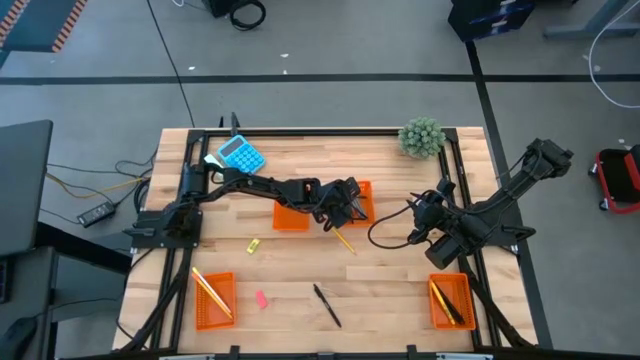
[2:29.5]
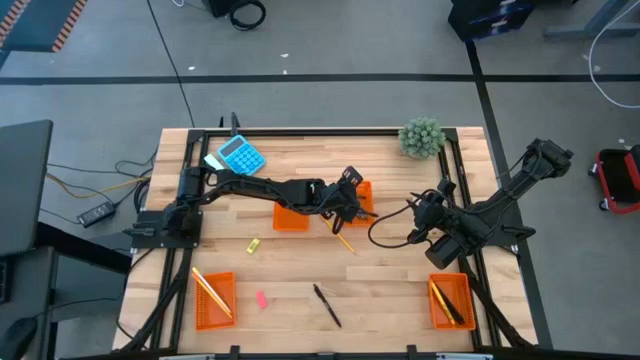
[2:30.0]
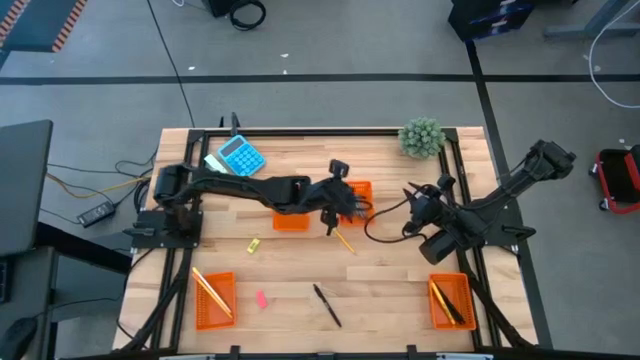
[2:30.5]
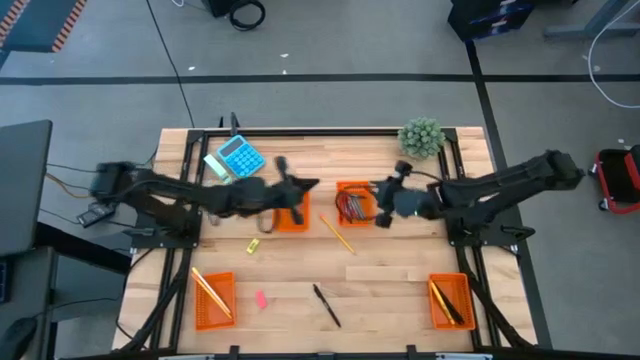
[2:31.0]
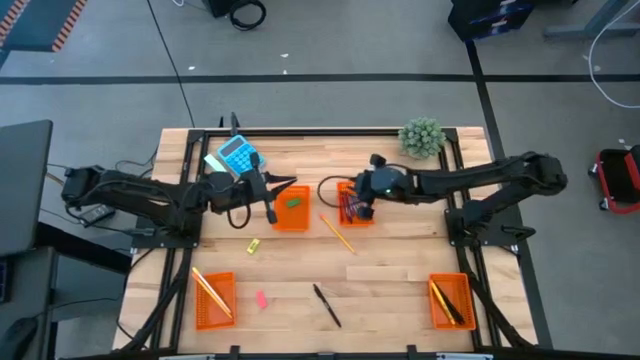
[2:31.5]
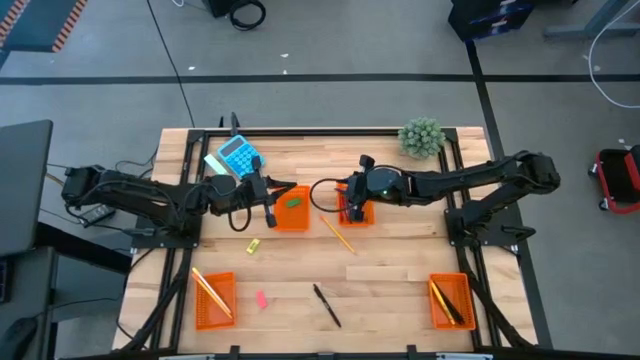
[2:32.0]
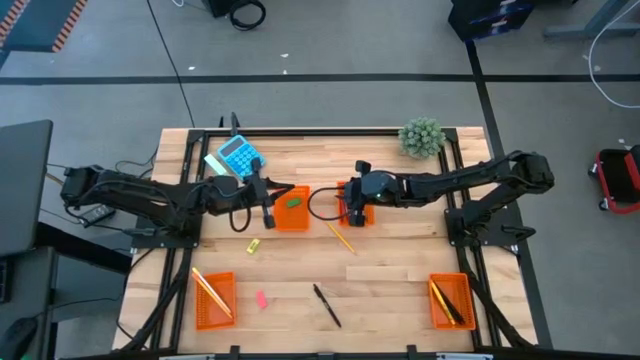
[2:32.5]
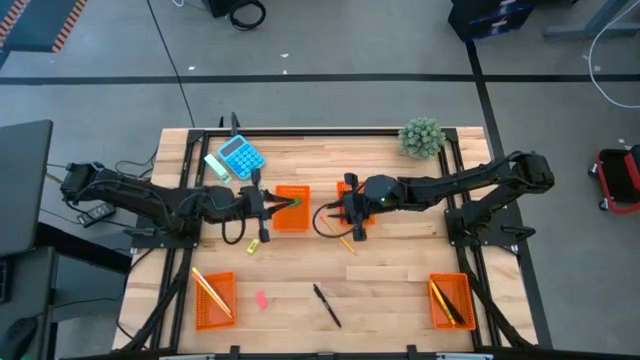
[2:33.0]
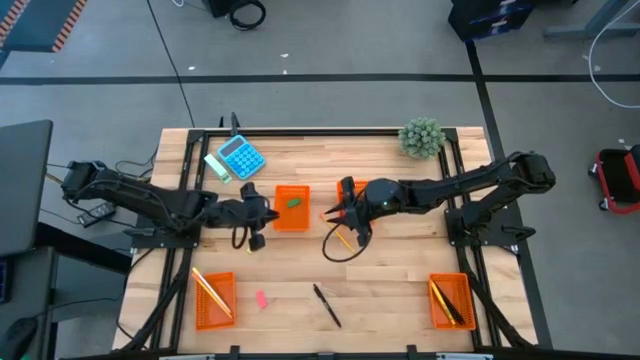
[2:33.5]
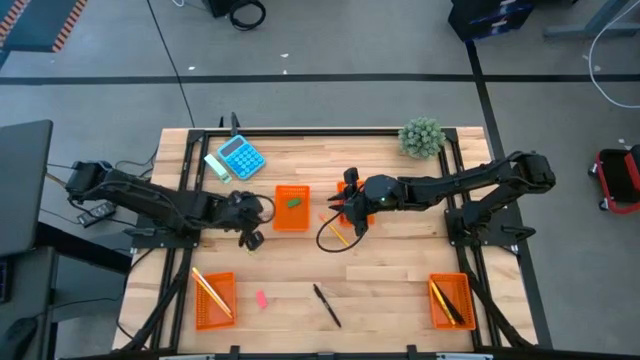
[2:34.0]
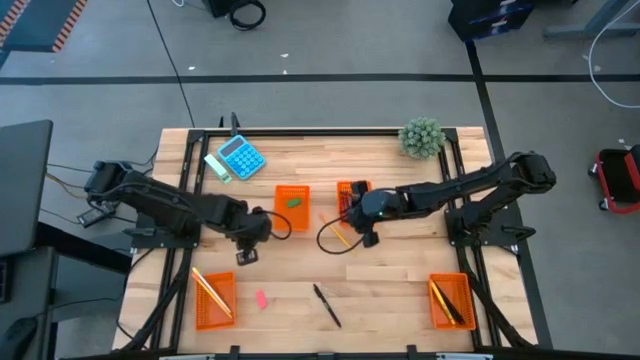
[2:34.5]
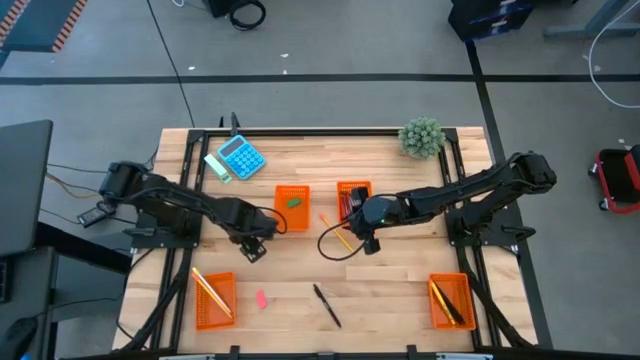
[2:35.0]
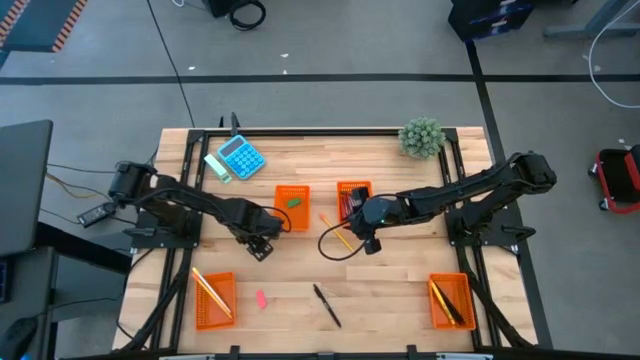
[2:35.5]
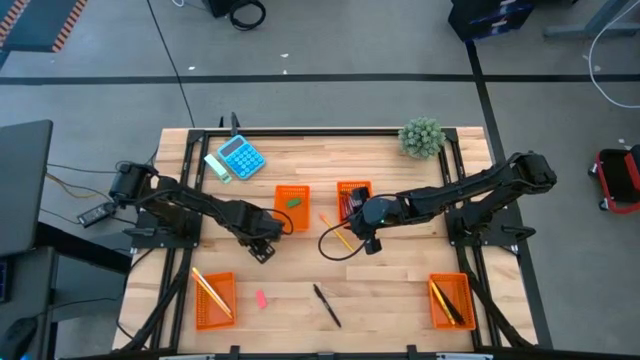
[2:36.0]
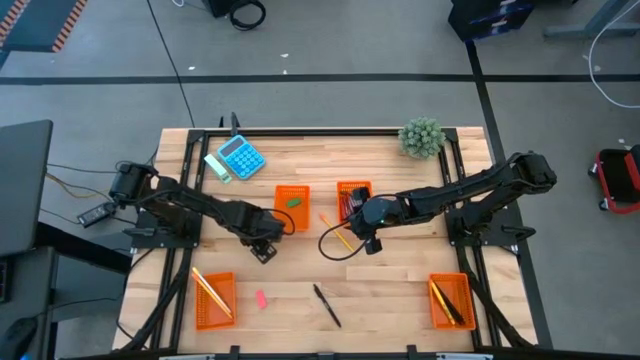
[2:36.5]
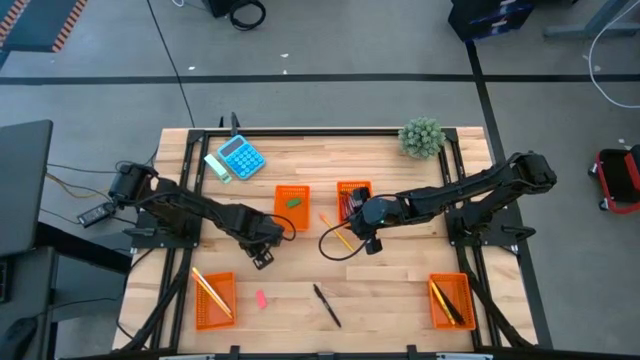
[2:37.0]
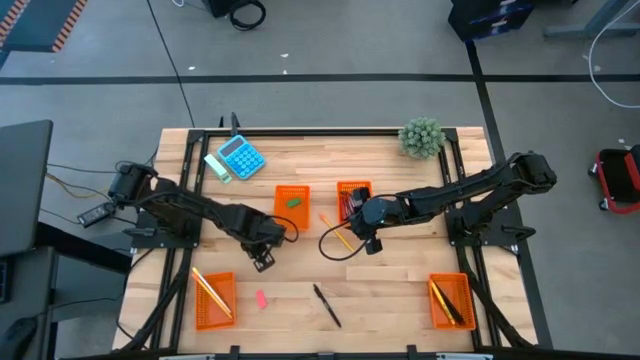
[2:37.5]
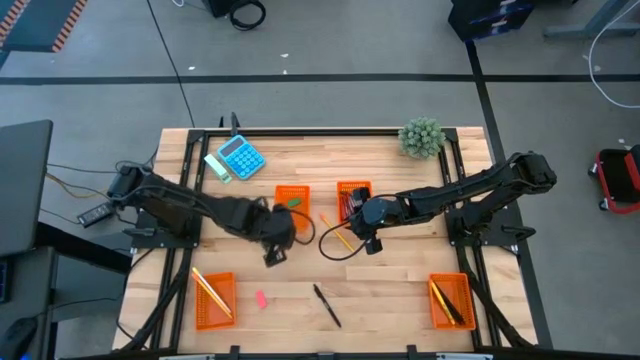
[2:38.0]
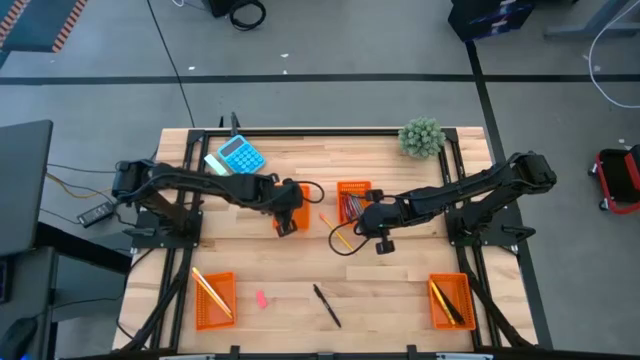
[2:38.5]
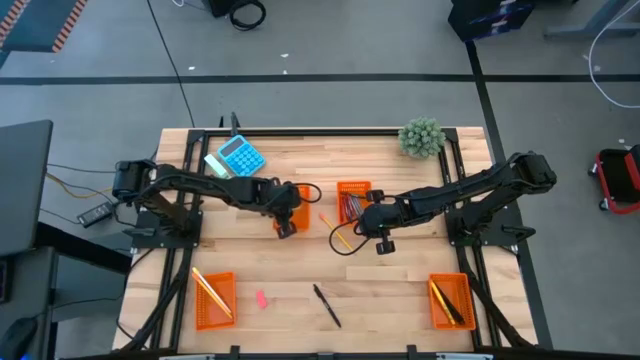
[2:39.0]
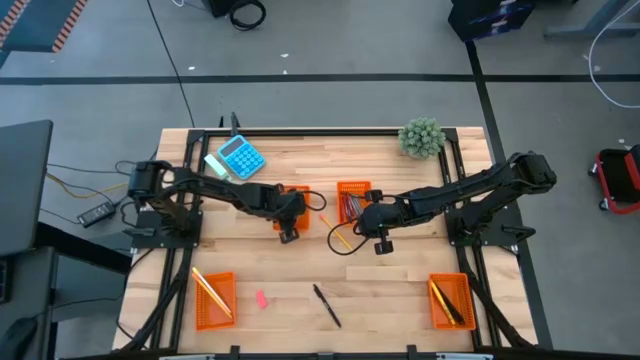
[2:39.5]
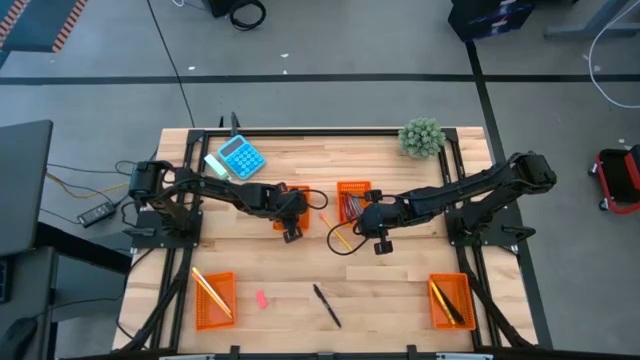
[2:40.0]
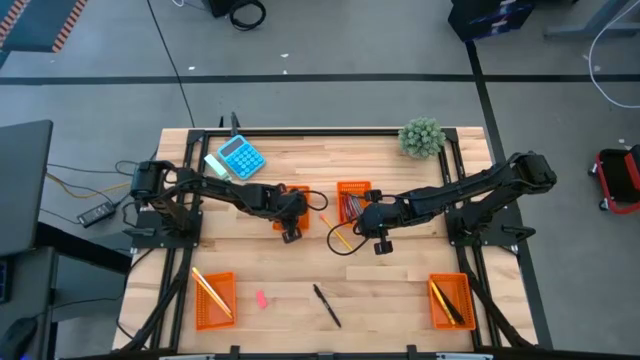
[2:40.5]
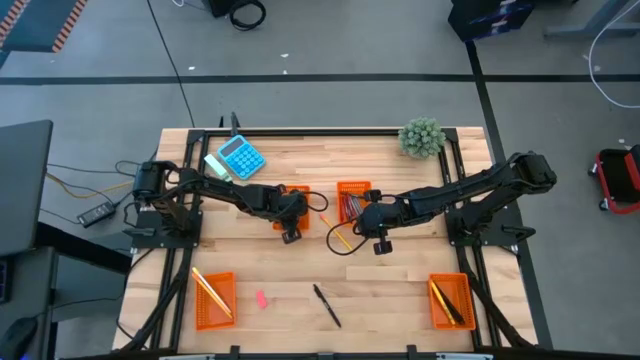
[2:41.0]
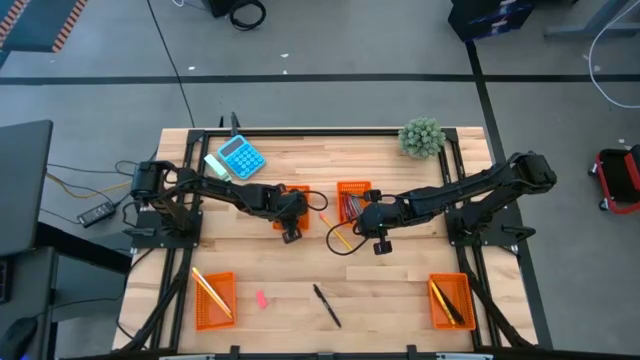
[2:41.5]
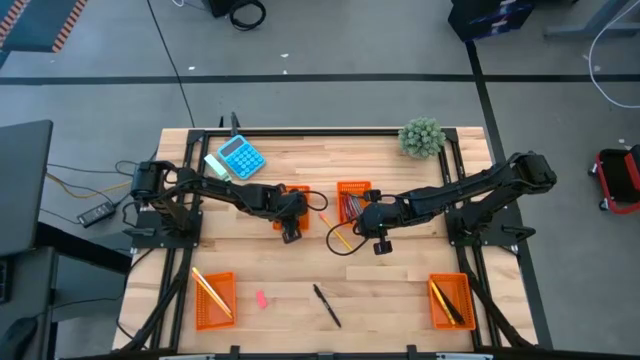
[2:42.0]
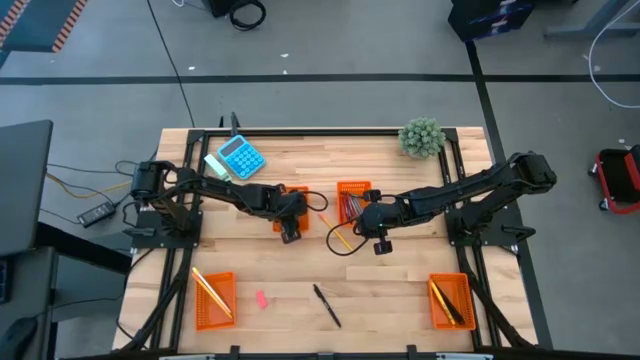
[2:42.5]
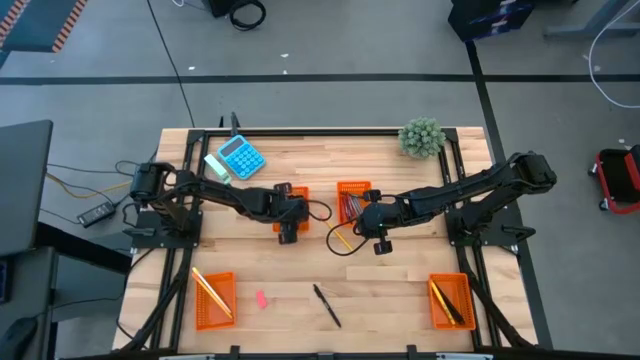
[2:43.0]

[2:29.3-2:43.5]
Task: Sort crayons/erasers/pens/pencils in bins
Put the yellow eraser into the top left orange bin

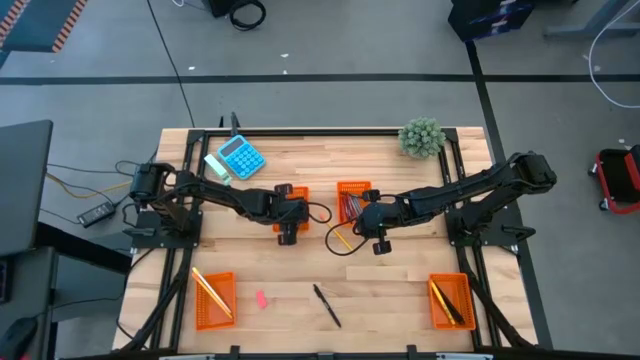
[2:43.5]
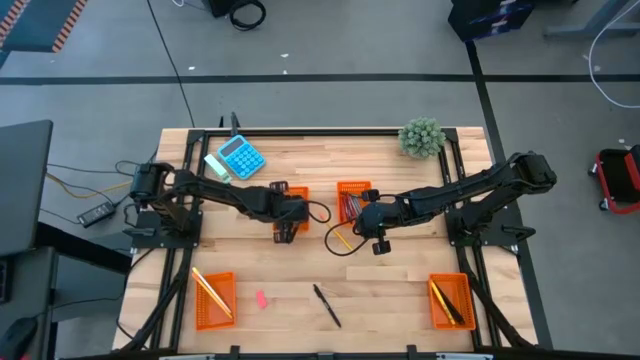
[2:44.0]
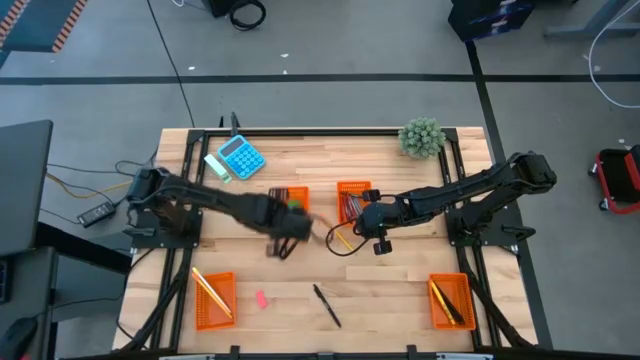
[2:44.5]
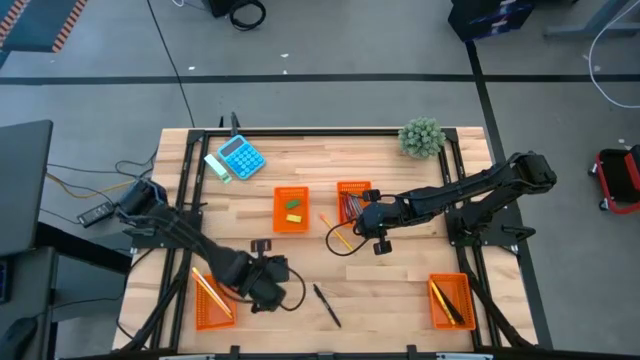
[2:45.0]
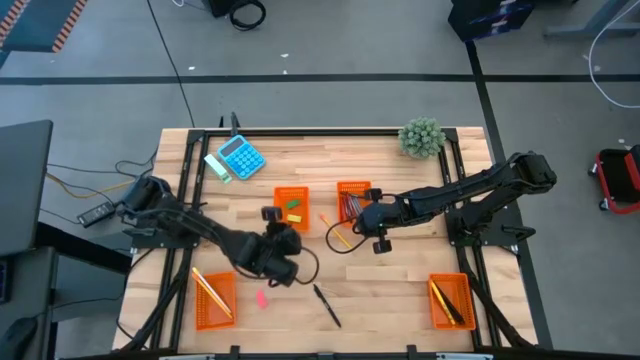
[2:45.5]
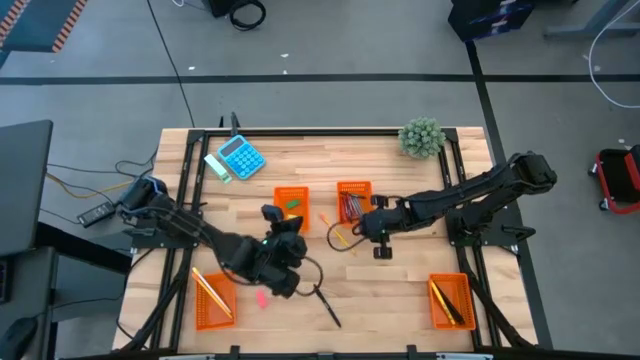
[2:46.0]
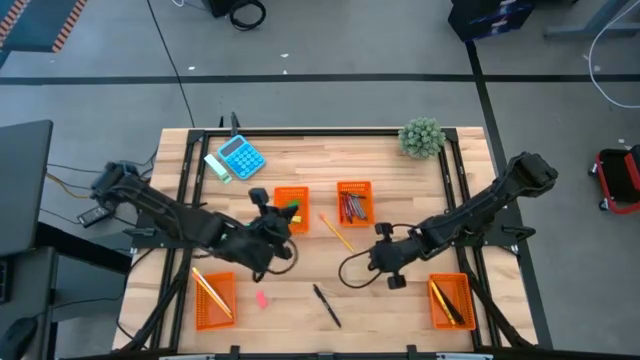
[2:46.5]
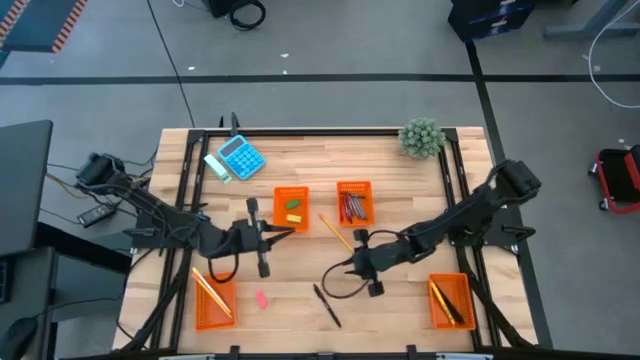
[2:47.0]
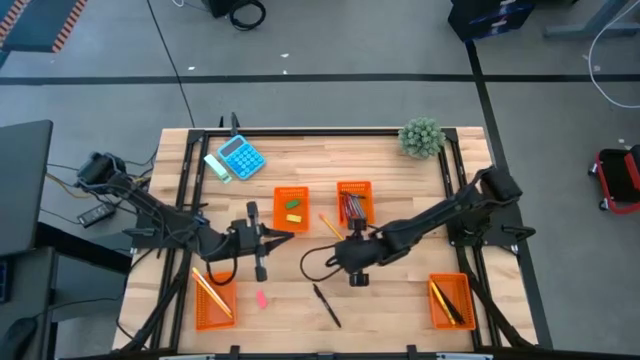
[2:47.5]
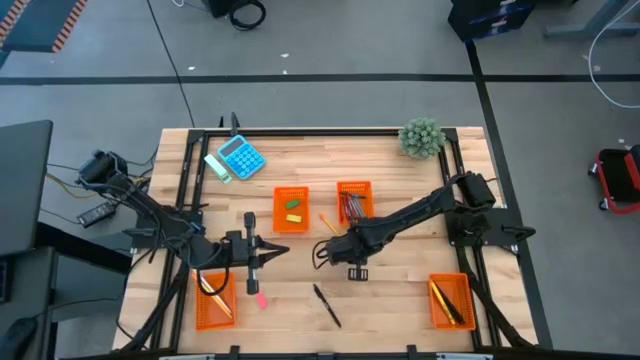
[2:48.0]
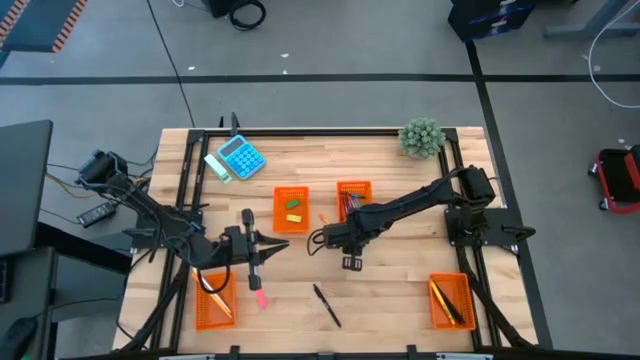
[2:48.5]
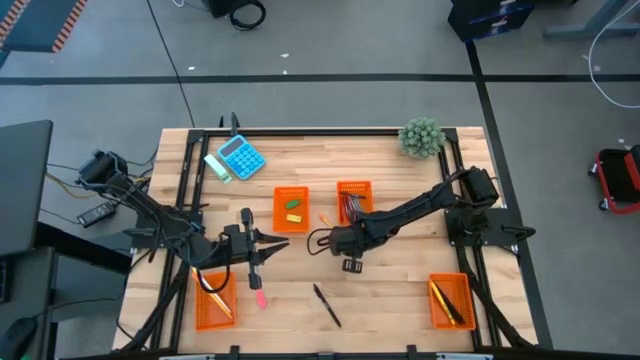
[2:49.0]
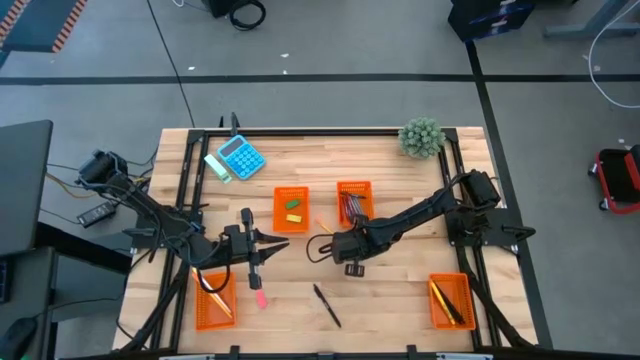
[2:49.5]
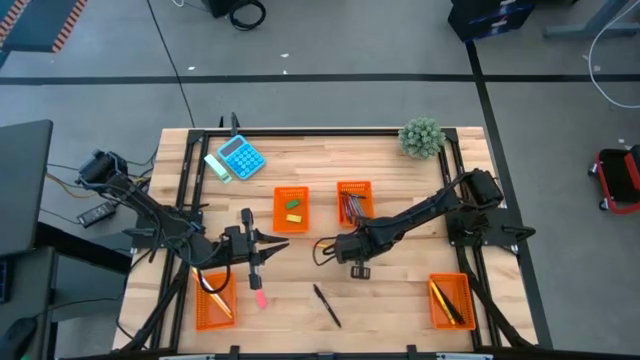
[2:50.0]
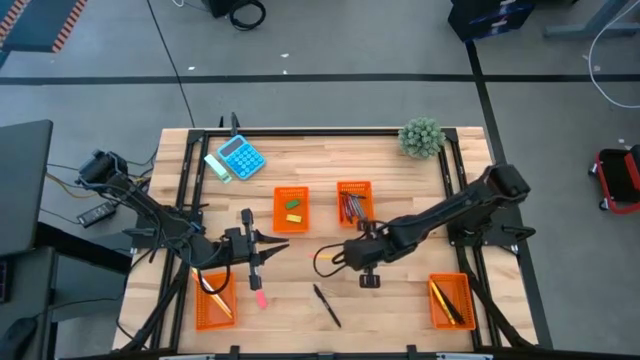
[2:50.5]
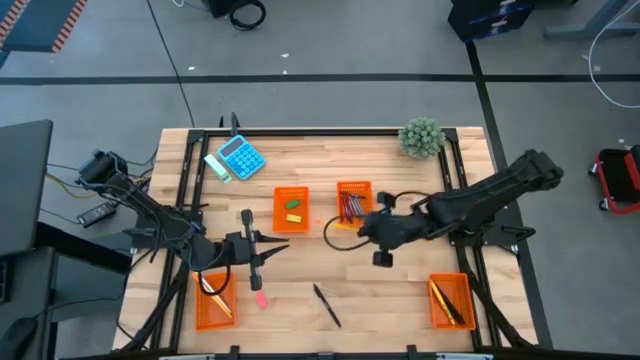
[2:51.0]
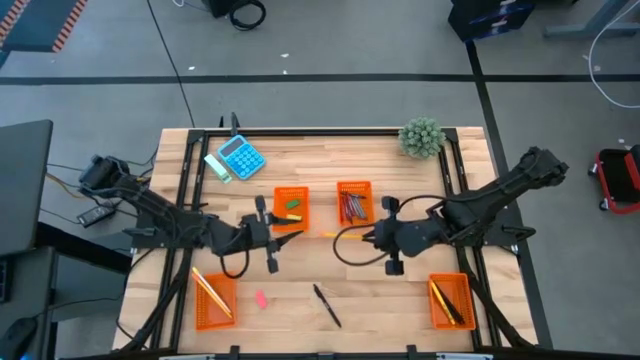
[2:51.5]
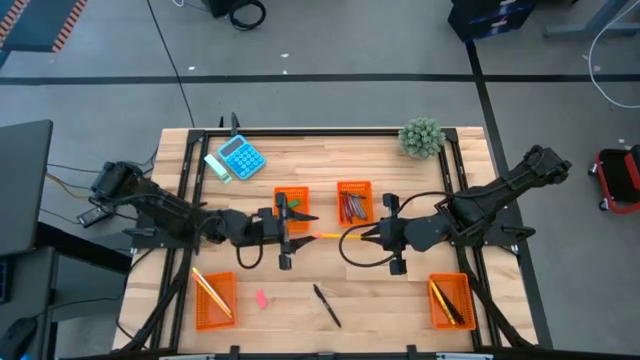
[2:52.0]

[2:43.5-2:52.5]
Put the yellow pencil into the bottom left orange bin
